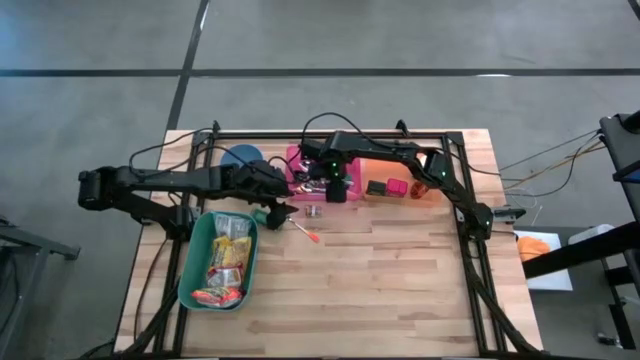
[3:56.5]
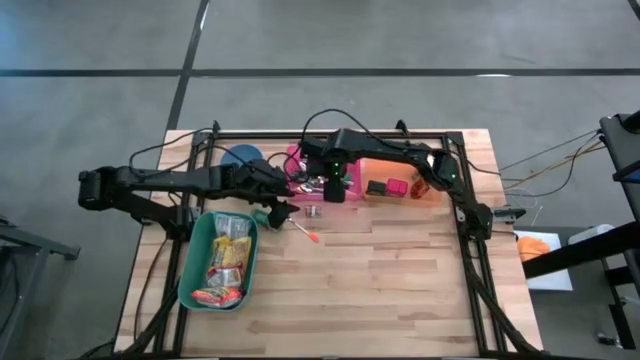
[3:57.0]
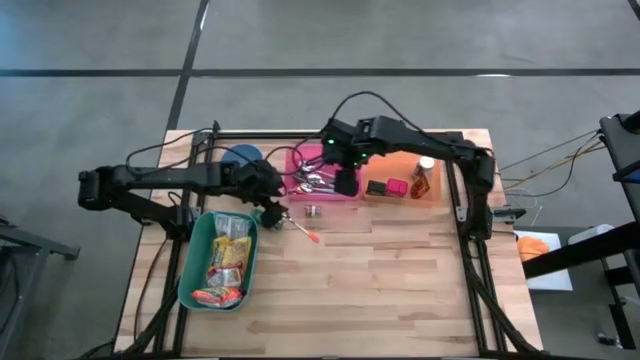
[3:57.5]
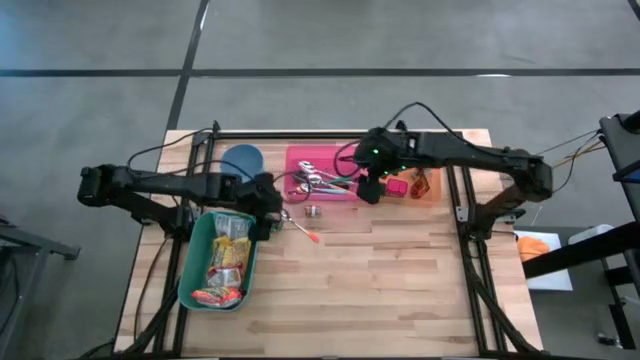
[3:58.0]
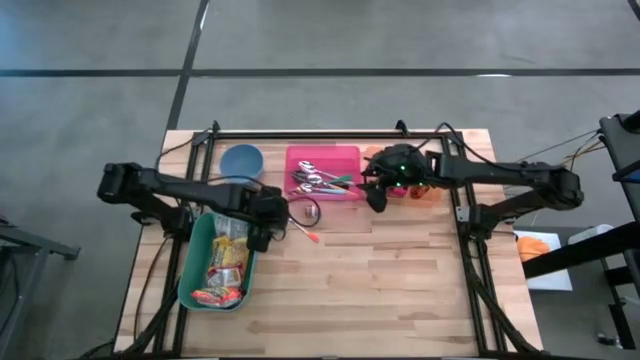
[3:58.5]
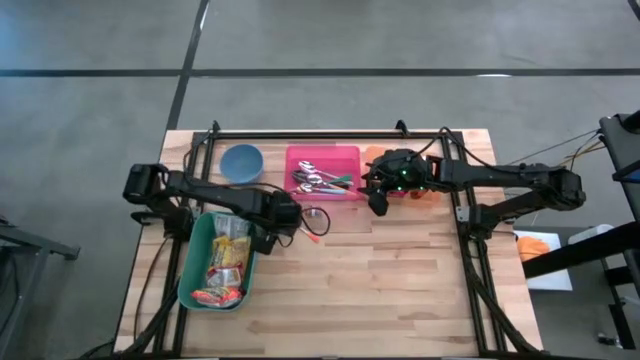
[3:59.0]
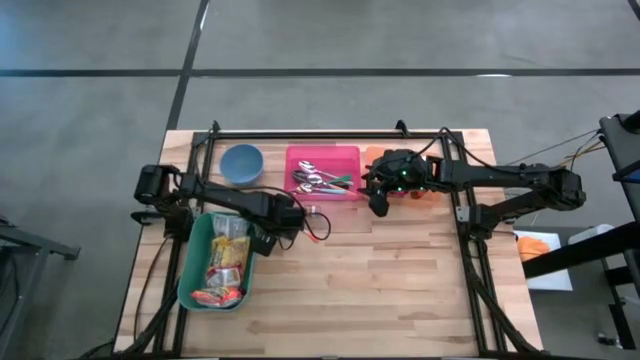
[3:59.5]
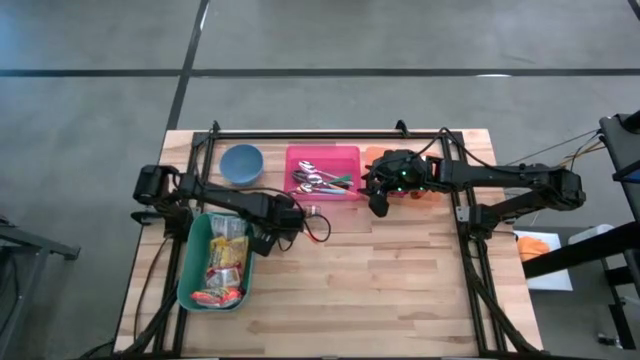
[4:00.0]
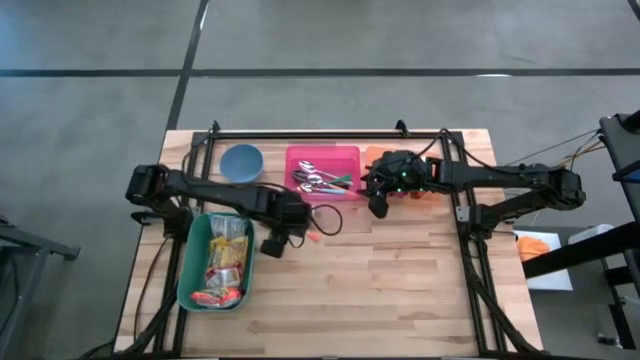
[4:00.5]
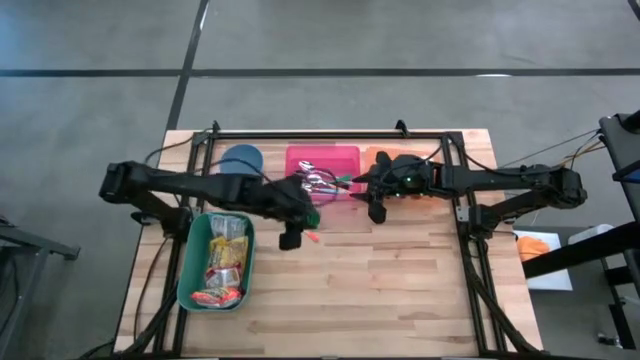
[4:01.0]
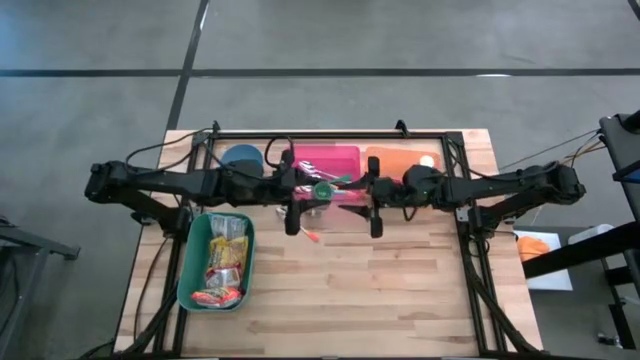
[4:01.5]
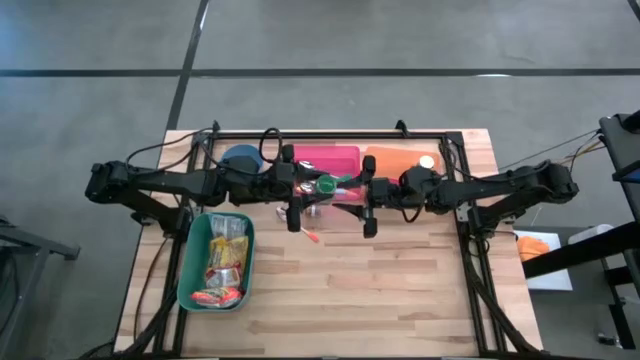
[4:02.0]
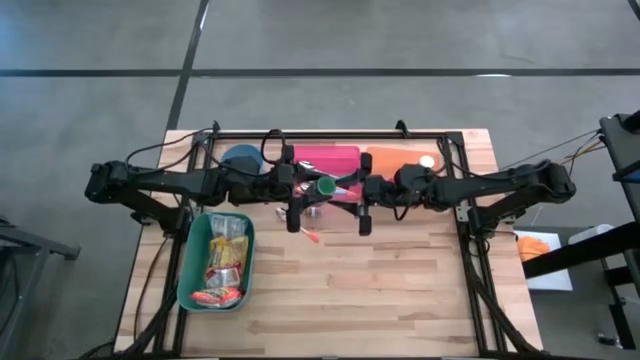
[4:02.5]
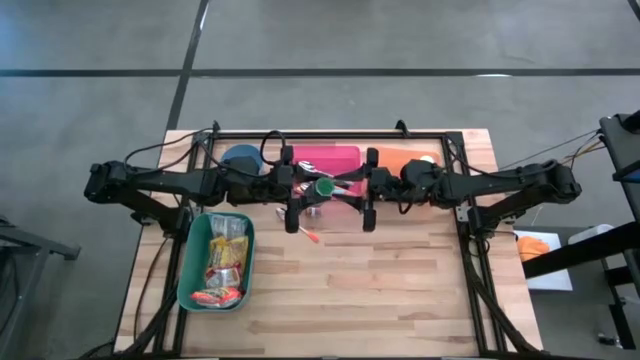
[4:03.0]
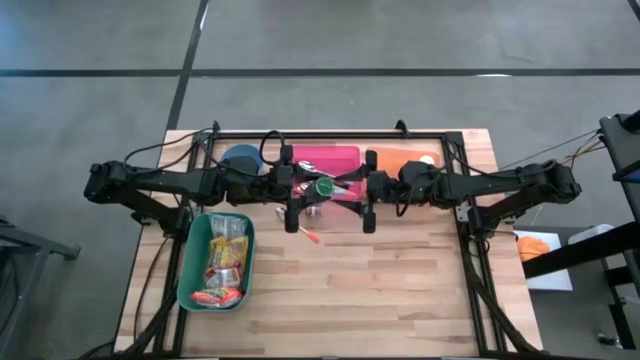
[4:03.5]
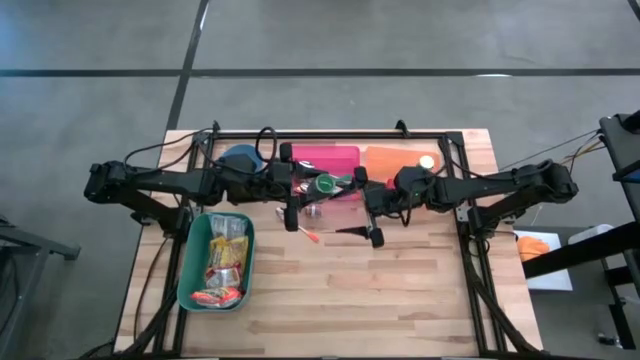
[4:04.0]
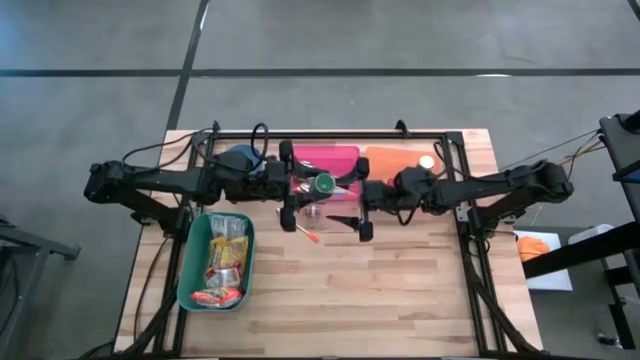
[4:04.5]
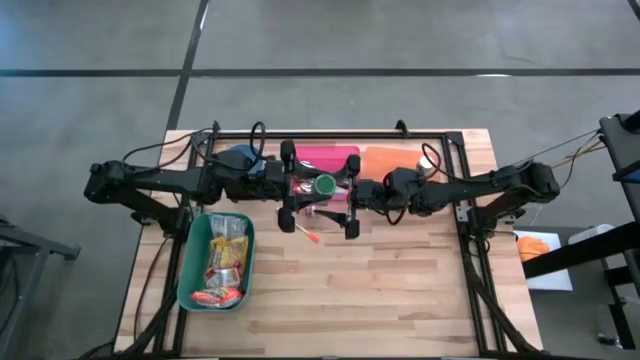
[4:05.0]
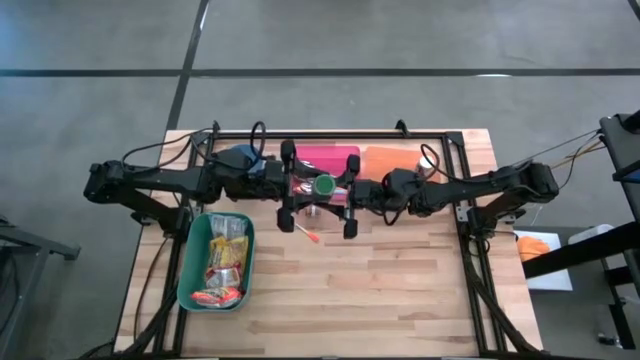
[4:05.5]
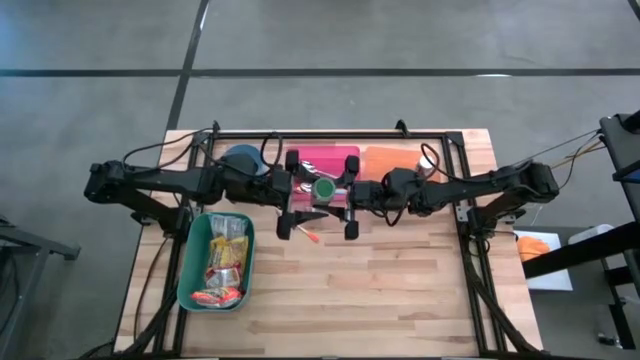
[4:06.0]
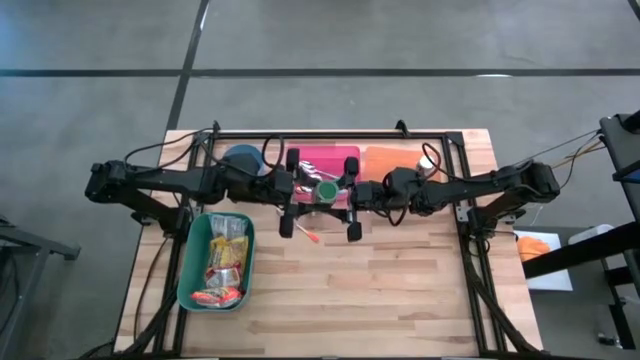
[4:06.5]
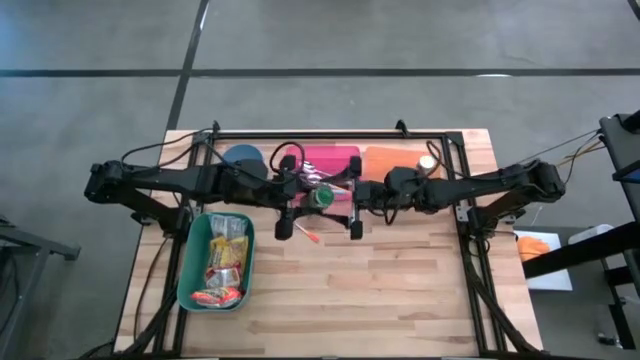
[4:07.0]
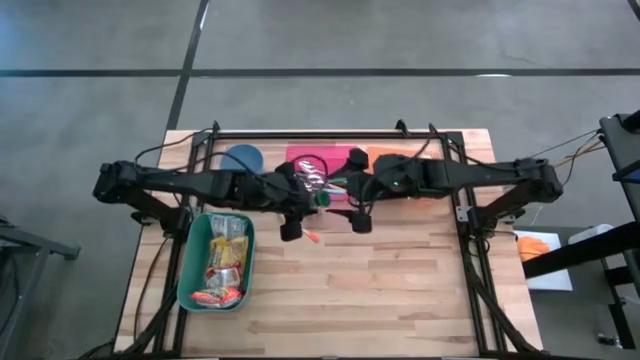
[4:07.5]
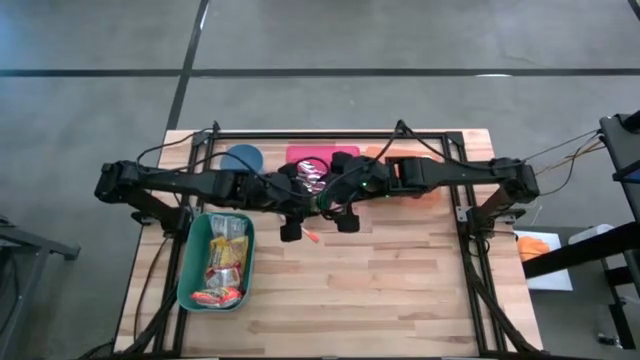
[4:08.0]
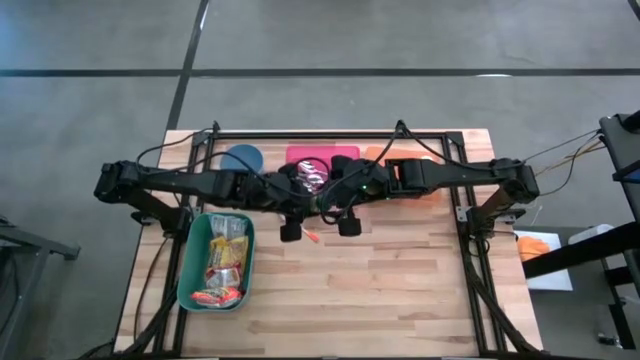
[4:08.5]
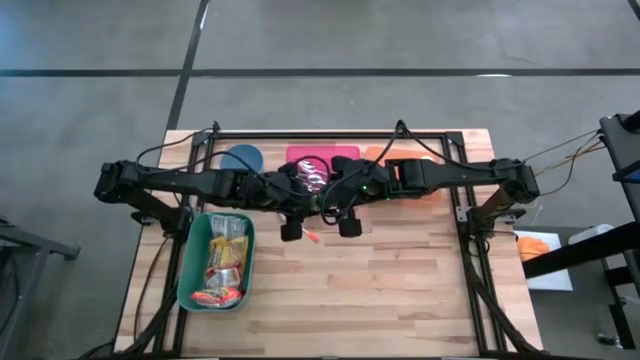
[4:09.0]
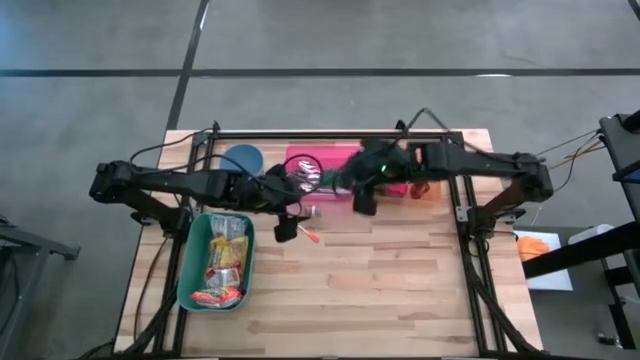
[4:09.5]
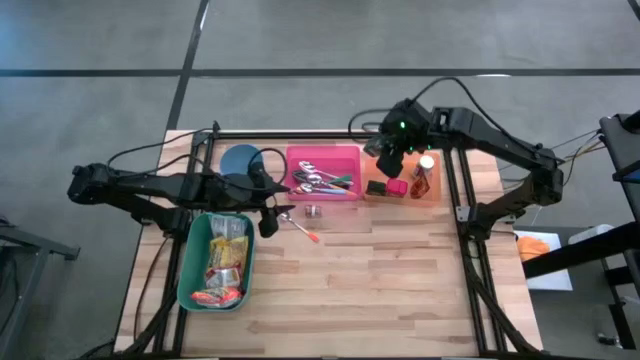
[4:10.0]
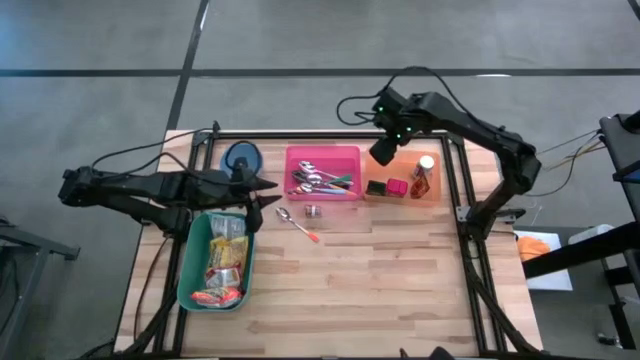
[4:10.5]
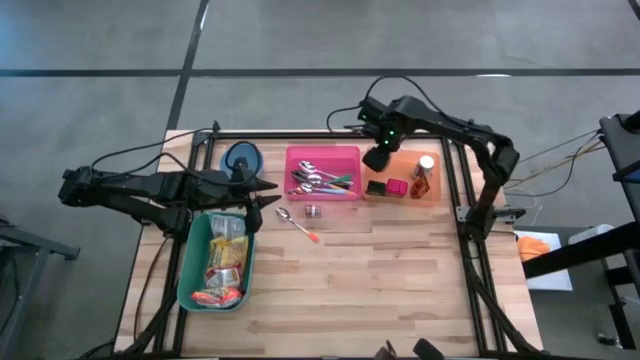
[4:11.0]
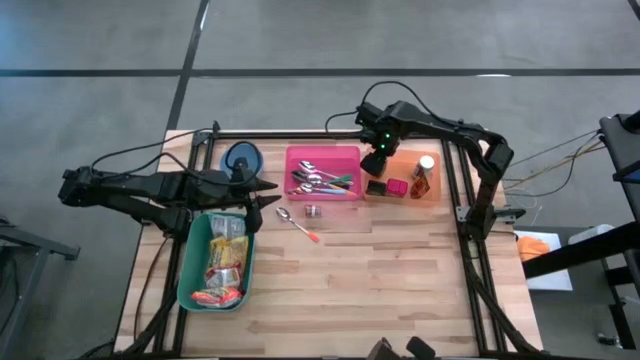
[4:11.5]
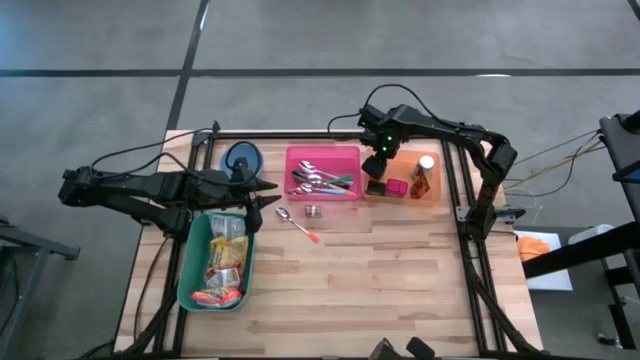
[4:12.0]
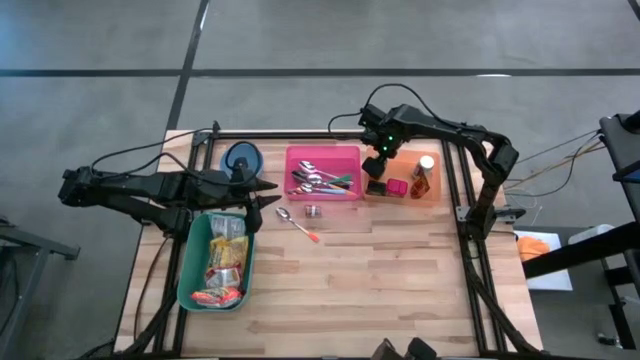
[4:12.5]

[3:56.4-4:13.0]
Put the green spice bottle into the orange bin

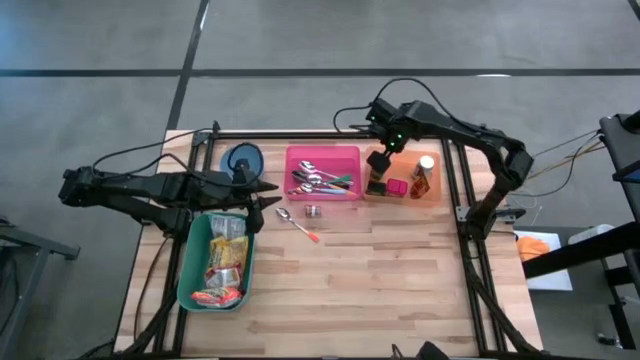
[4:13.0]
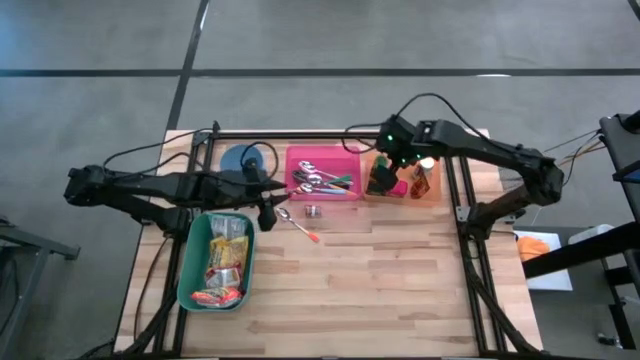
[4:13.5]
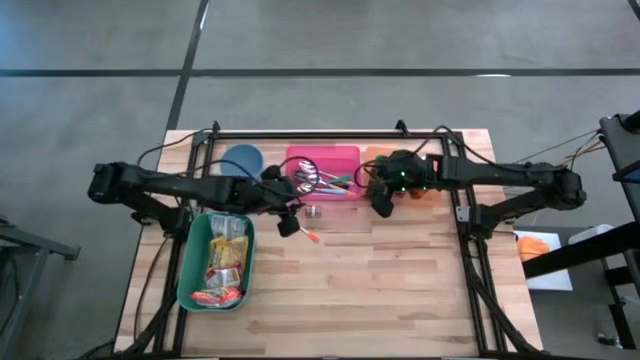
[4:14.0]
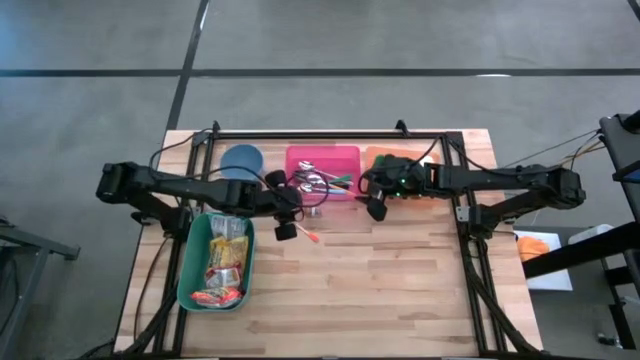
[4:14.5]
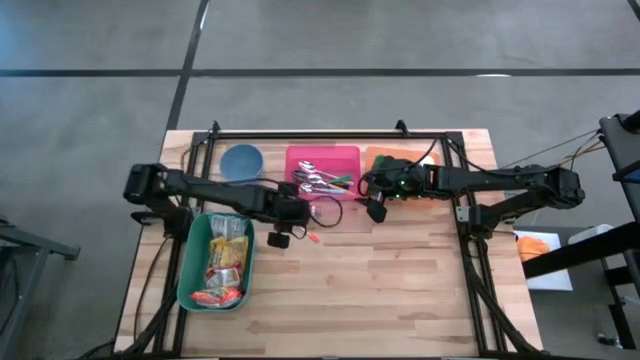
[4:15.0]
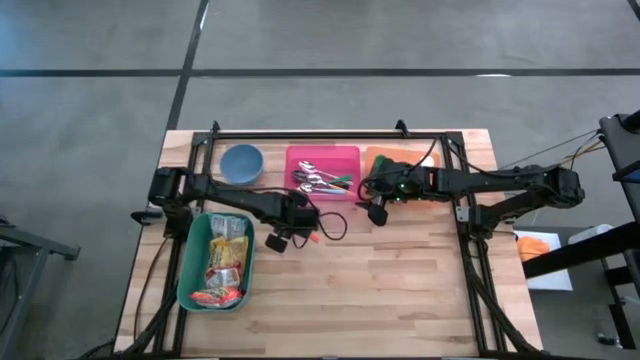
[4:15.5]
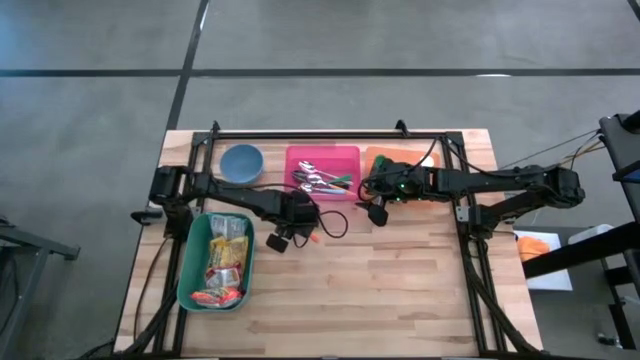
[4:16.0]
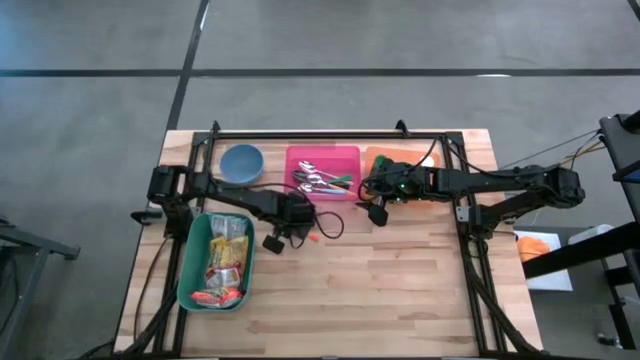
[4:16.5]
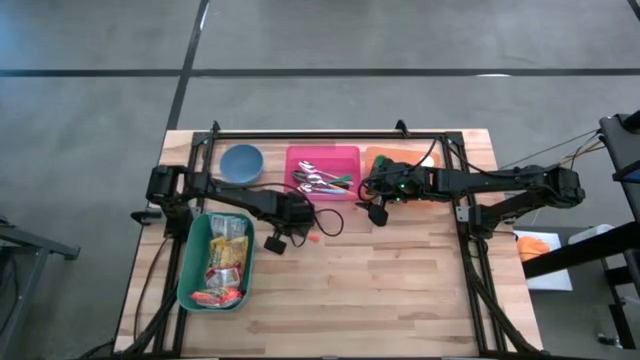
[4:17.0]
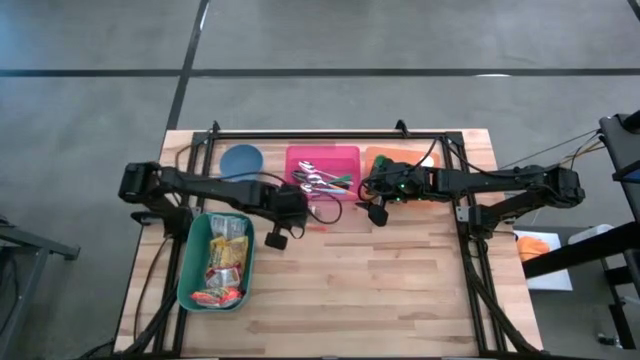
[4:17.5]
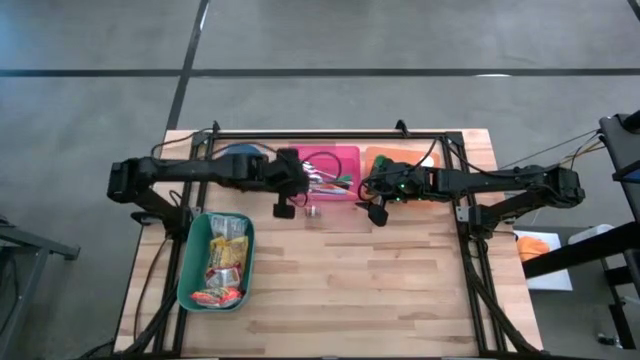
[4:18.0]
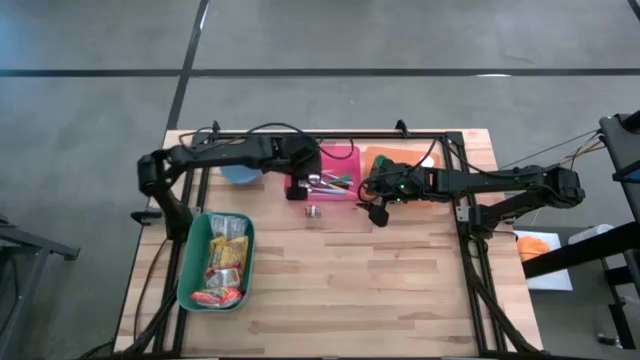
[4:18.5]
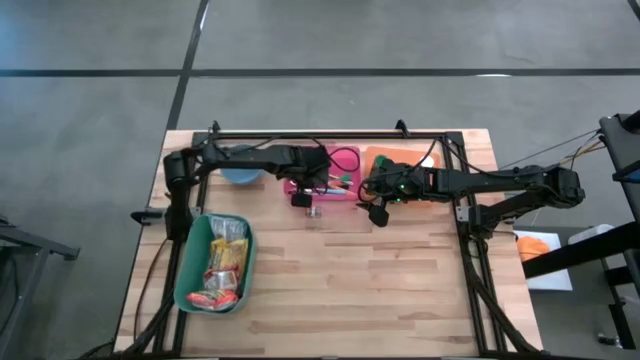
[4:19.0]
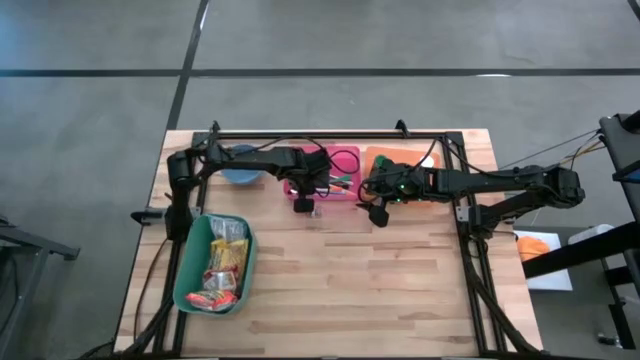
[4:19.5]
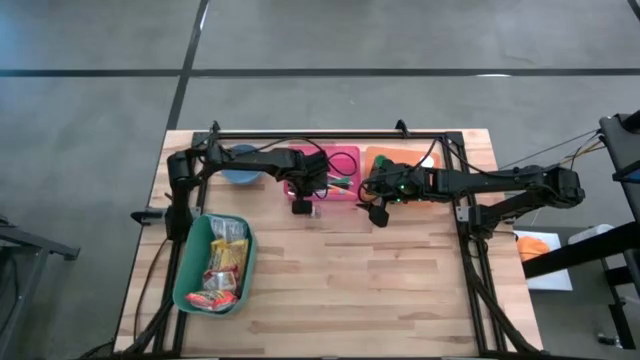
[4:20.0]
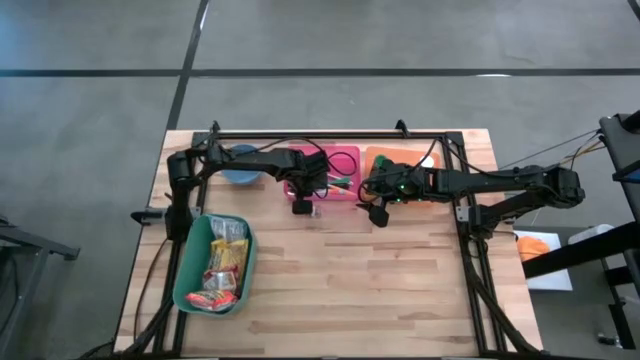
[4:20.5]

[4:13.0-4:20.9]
Put the orange spoon into the pink bin
